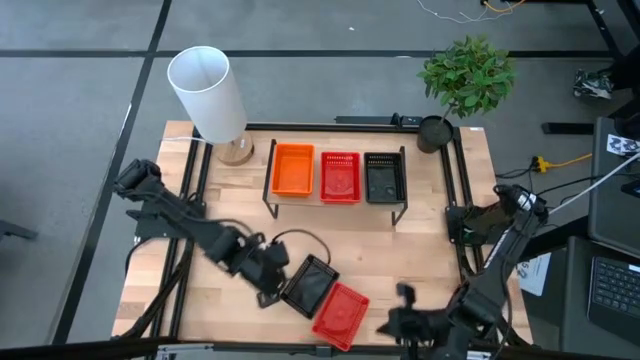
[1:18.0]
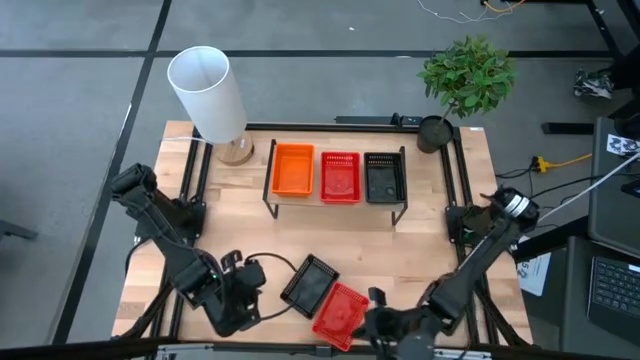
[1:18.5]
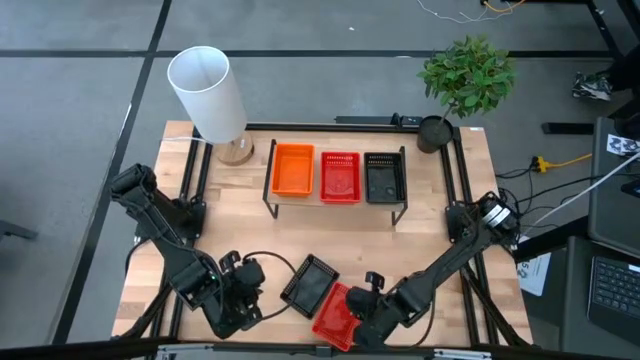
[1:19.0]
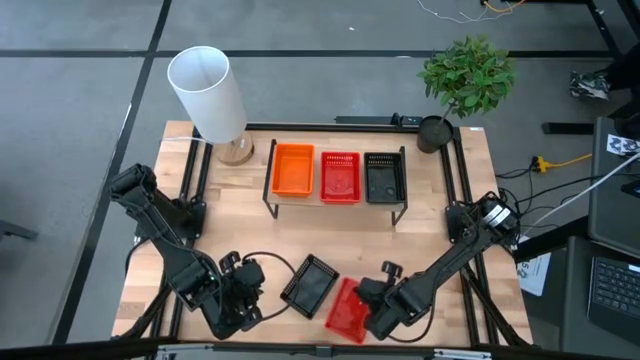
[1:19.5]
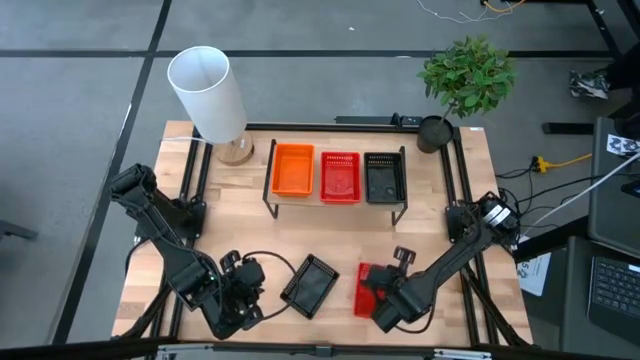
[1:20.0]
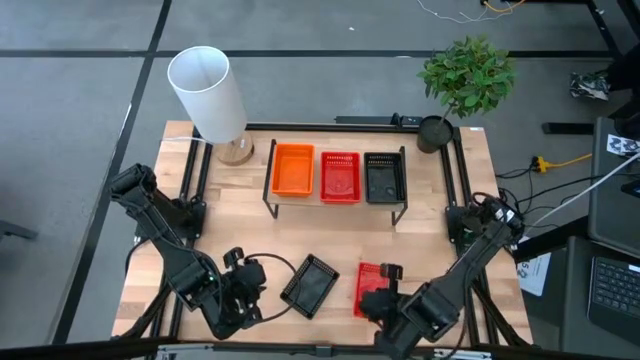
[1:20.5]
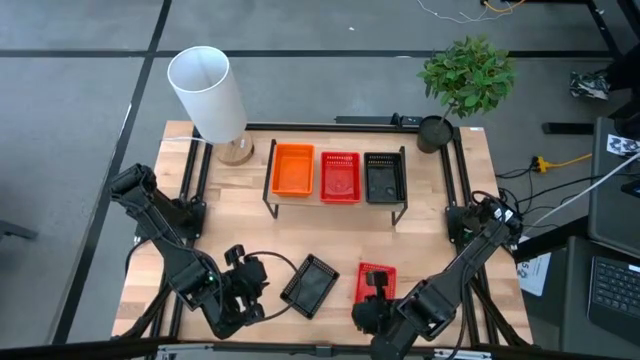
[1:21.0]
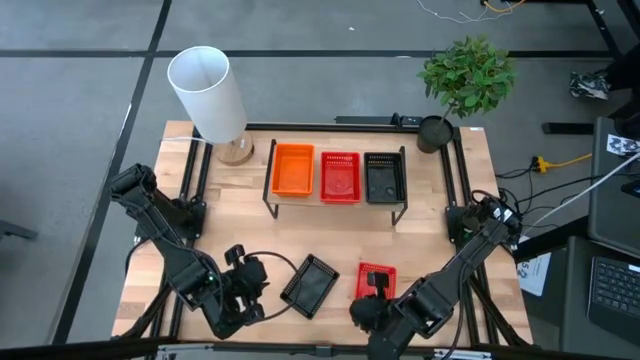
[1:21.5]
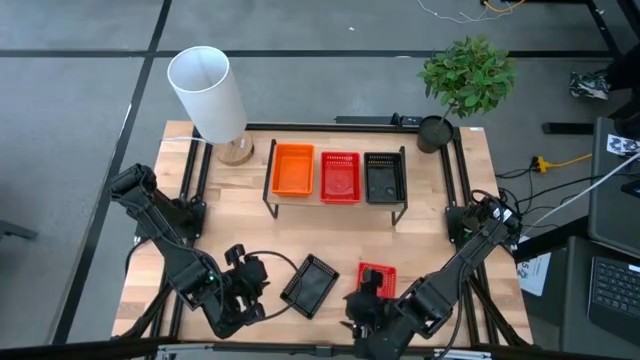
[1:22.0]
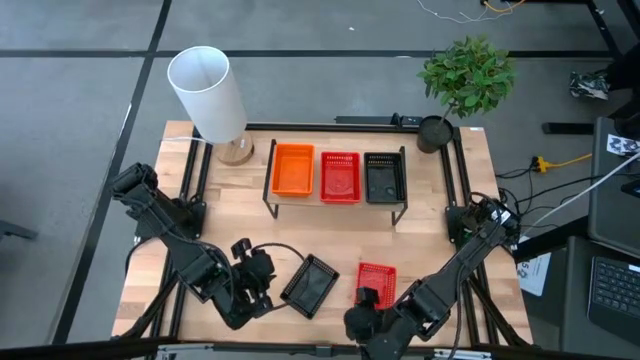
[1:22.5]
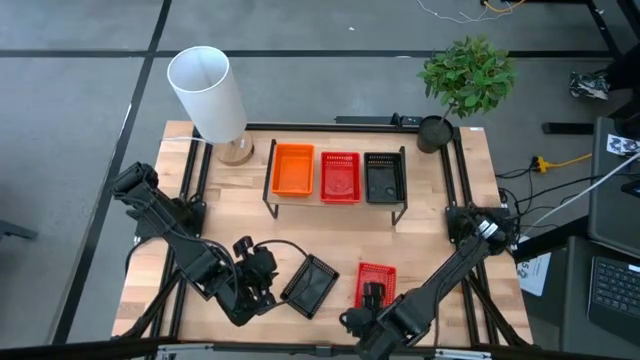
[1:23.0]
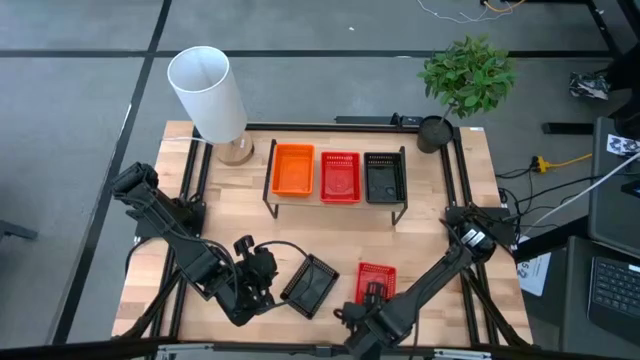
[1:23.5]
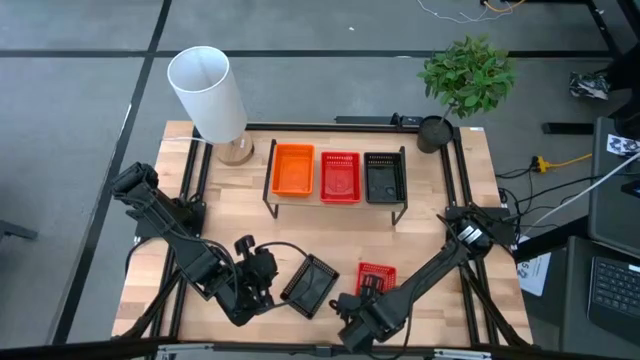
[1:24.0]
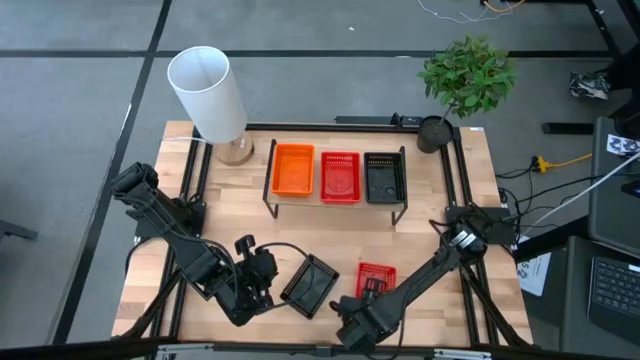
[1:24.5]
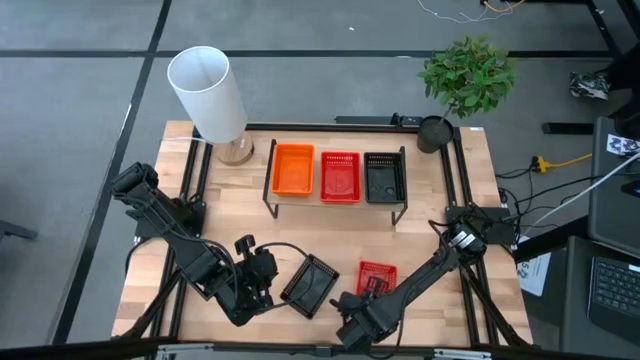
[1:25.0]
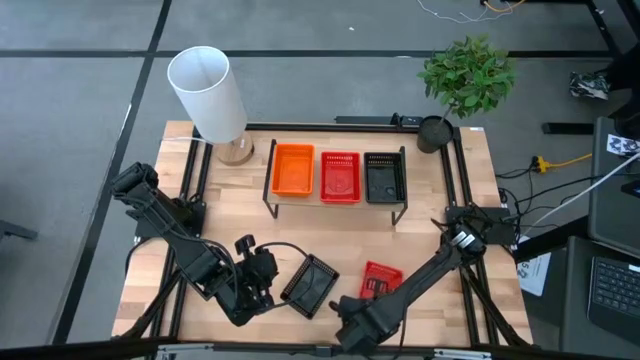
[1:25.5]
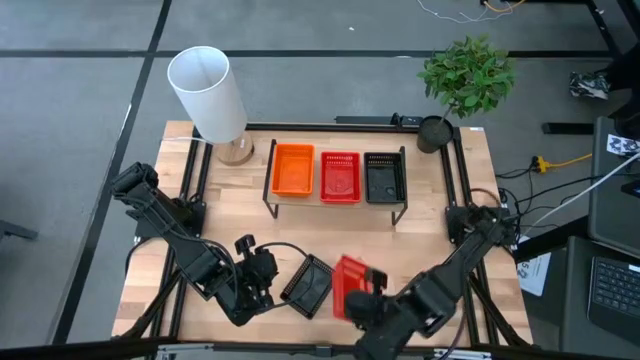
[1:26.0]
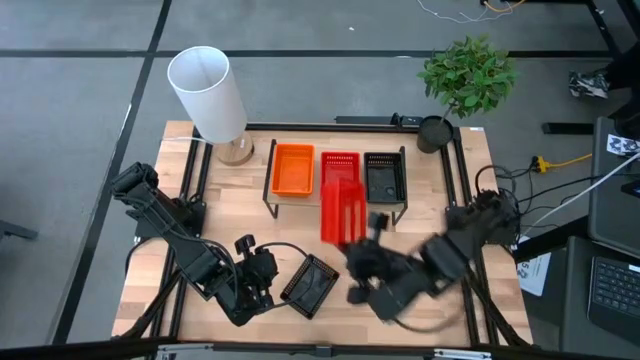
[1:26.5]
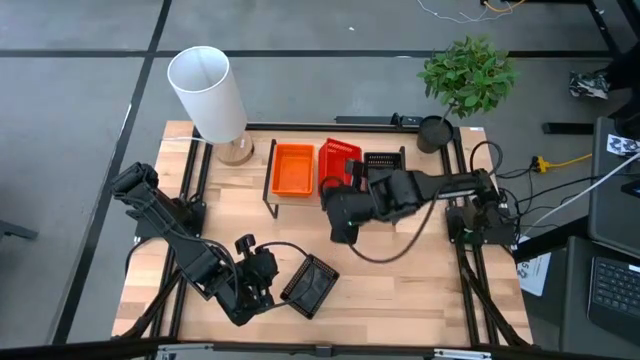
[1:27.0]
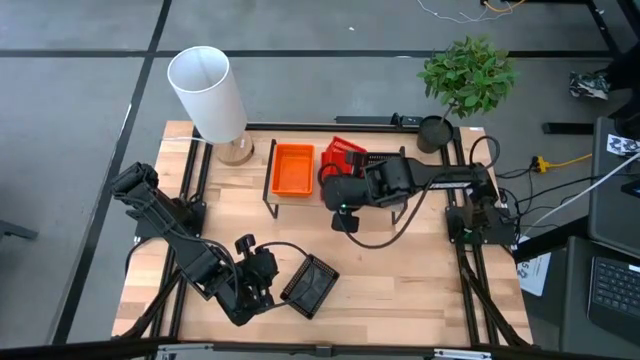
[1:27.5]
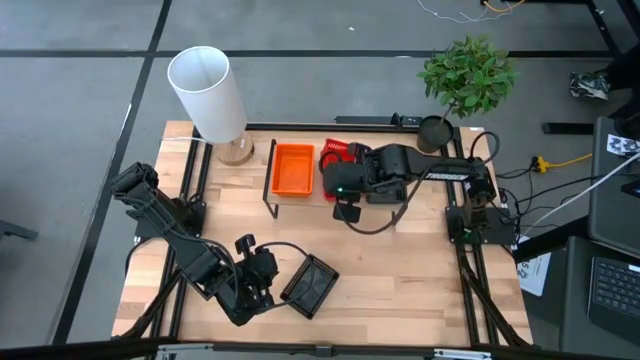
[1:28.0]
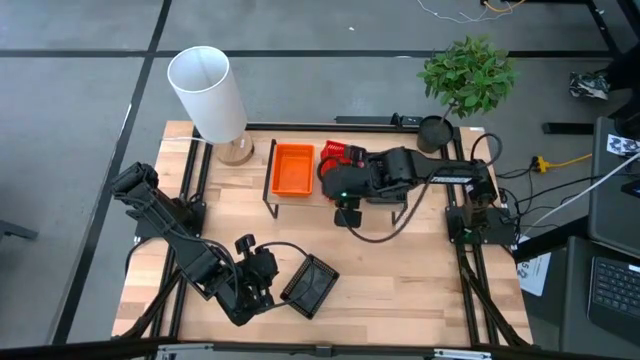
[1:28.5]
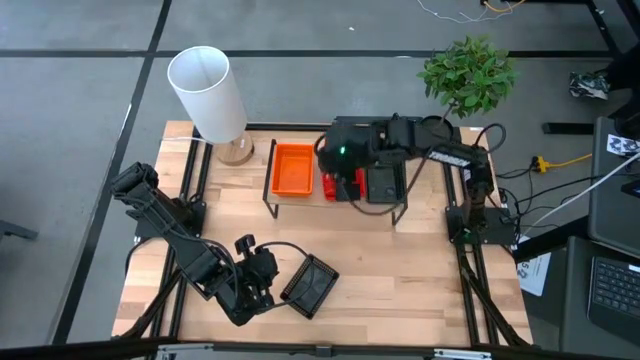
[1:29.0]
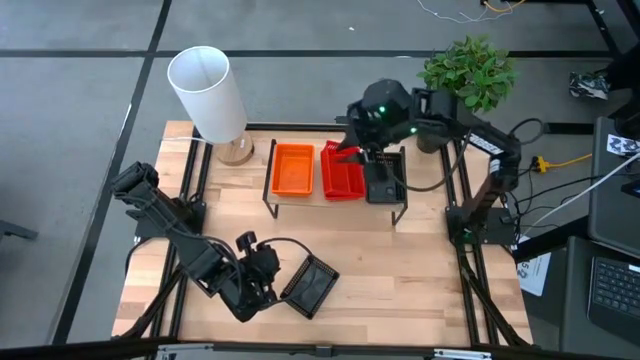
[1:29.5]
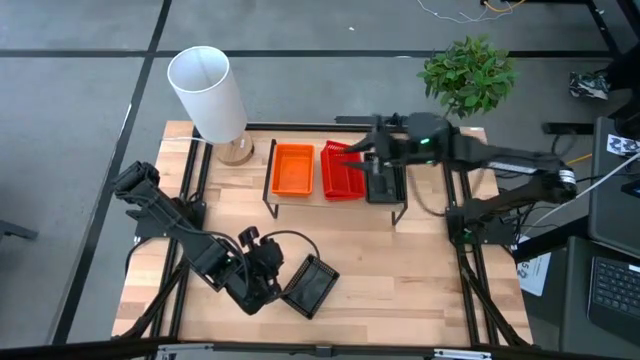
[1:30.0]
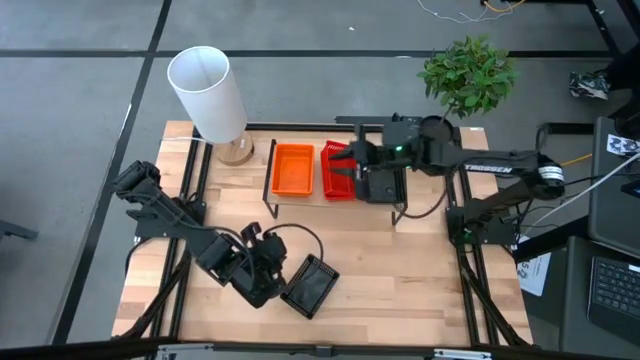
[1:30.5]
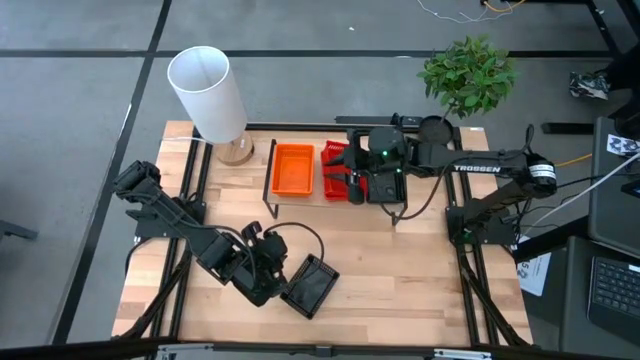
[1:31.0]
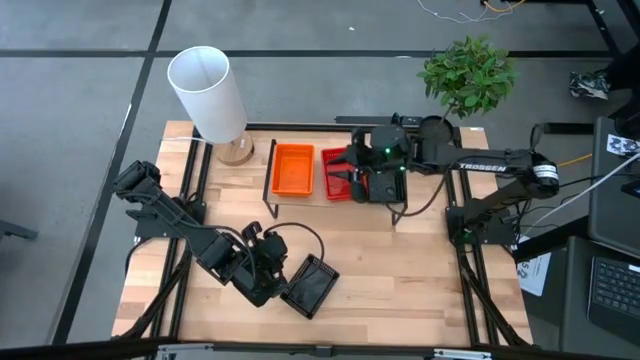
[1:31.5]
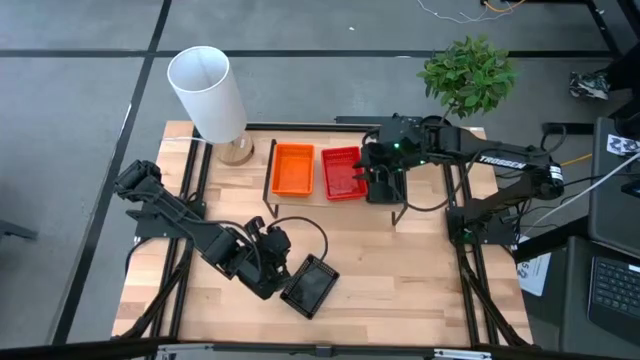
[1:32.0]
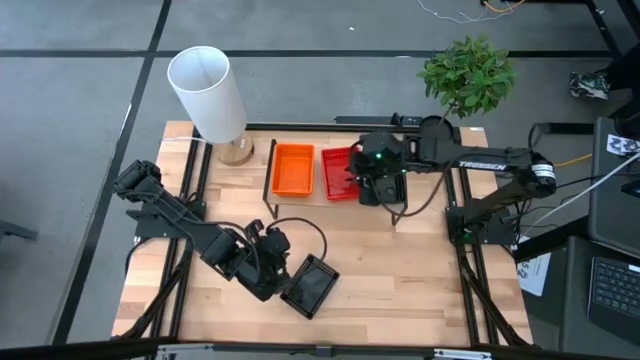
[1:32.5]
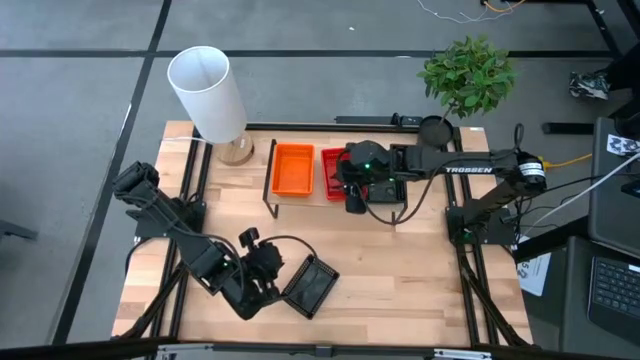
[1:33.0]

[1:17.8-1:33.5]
Task: Stack baskets on shelf by color
Stack the red bin on top of the other red bins on the shelf
